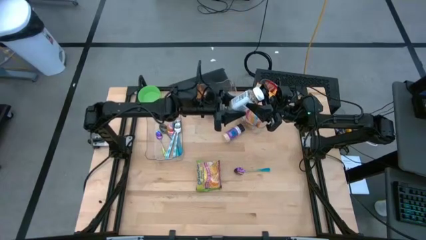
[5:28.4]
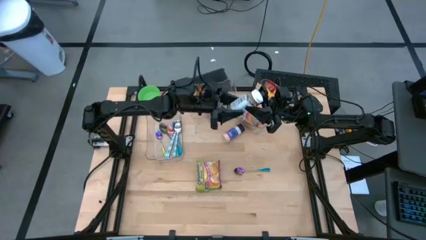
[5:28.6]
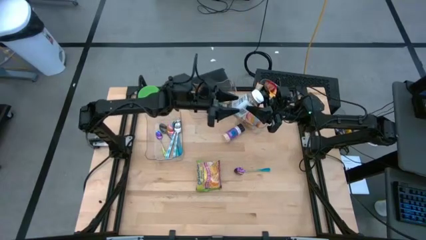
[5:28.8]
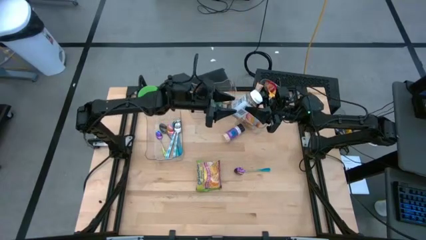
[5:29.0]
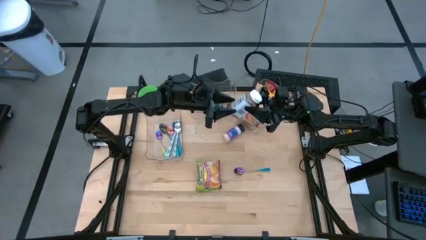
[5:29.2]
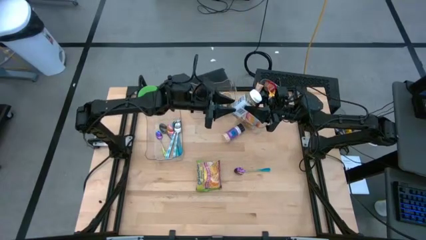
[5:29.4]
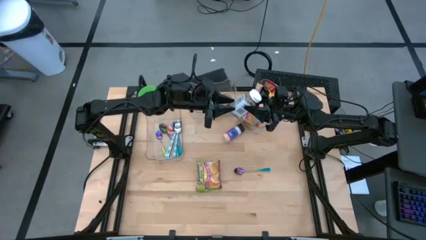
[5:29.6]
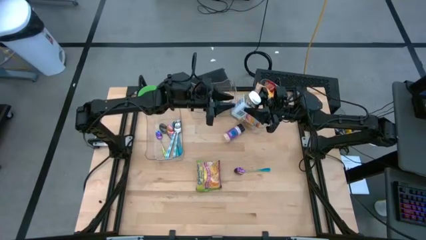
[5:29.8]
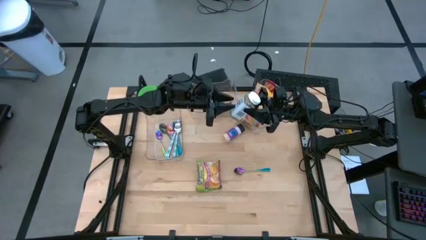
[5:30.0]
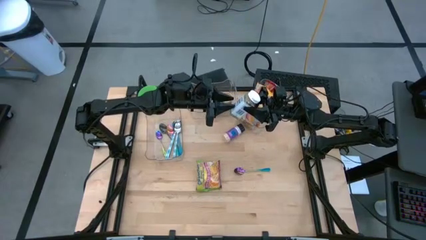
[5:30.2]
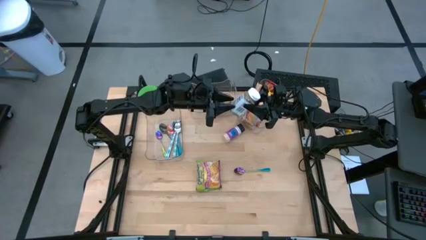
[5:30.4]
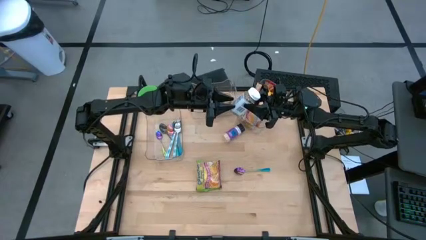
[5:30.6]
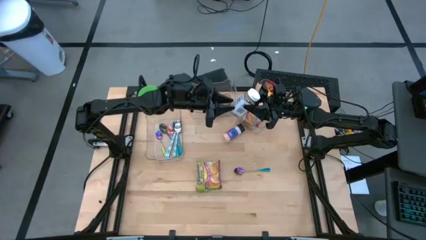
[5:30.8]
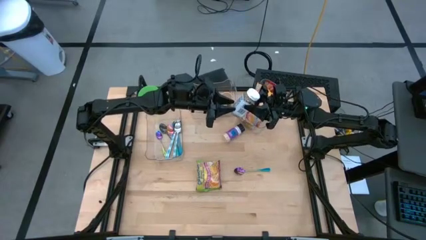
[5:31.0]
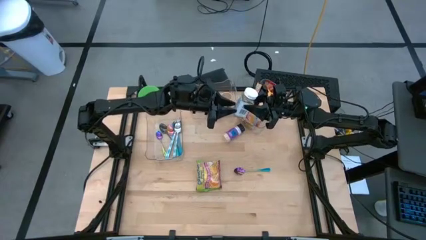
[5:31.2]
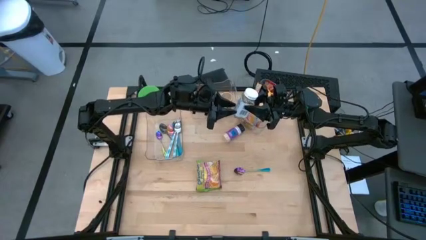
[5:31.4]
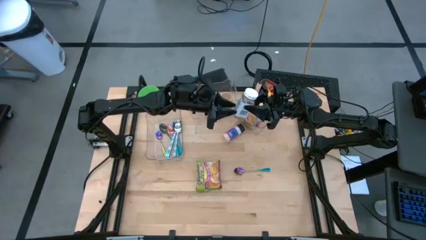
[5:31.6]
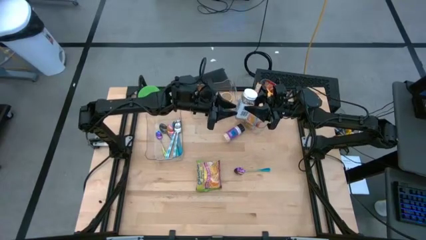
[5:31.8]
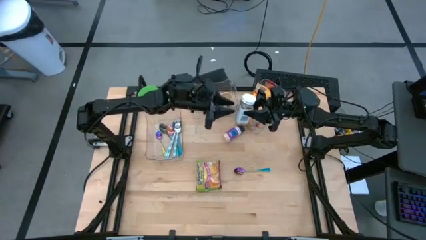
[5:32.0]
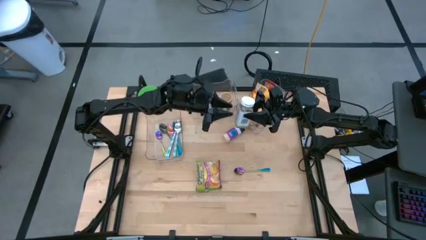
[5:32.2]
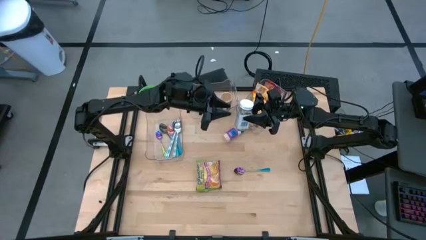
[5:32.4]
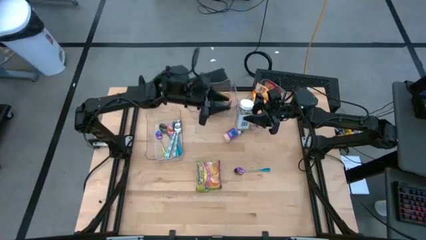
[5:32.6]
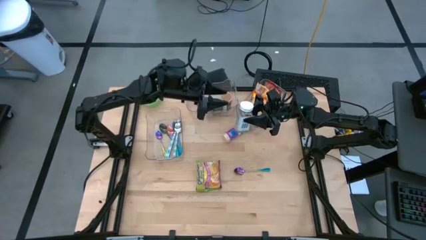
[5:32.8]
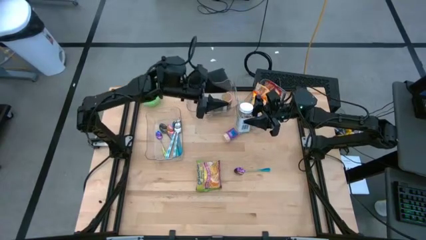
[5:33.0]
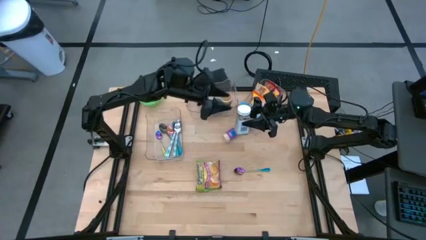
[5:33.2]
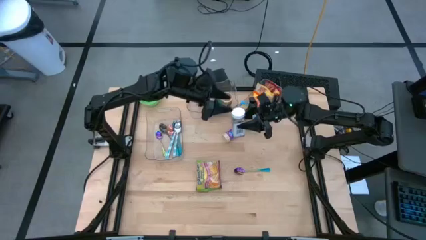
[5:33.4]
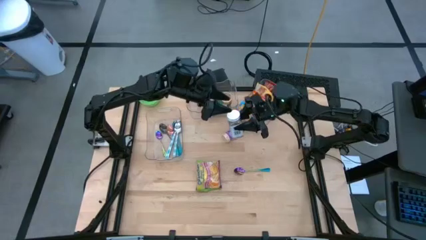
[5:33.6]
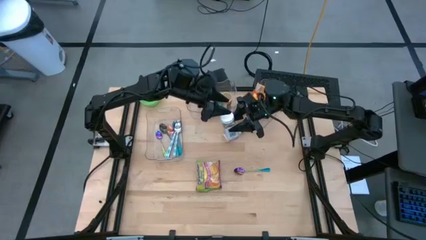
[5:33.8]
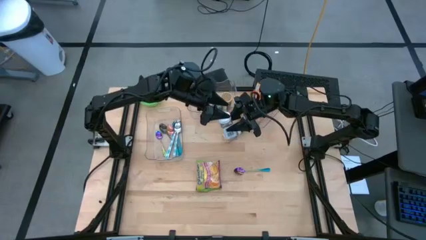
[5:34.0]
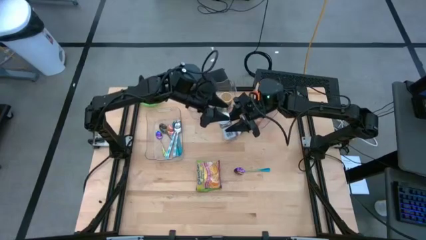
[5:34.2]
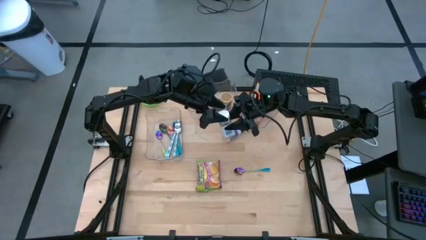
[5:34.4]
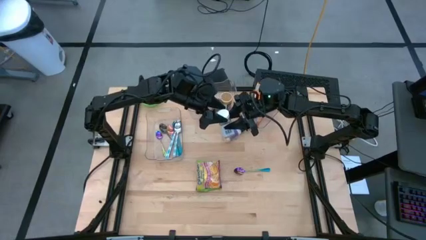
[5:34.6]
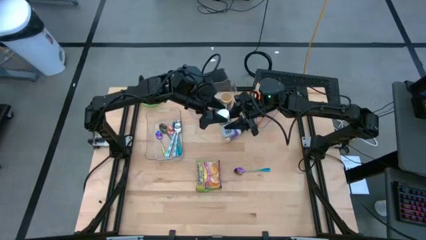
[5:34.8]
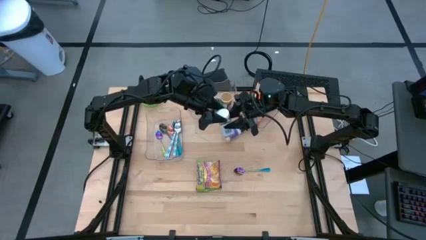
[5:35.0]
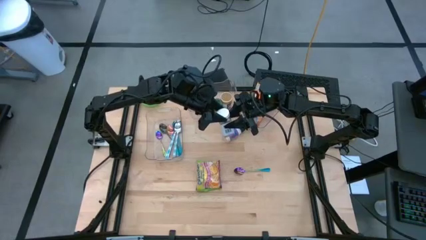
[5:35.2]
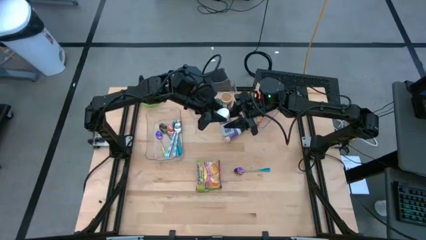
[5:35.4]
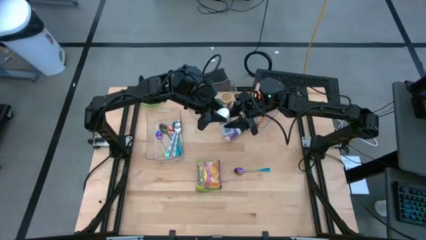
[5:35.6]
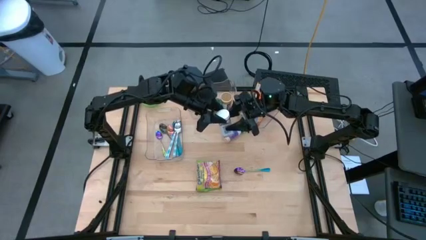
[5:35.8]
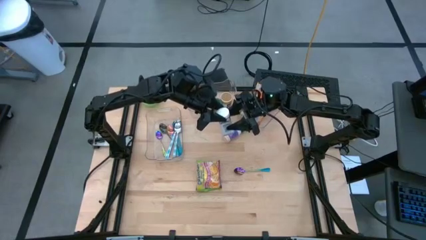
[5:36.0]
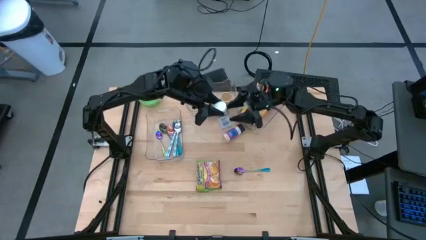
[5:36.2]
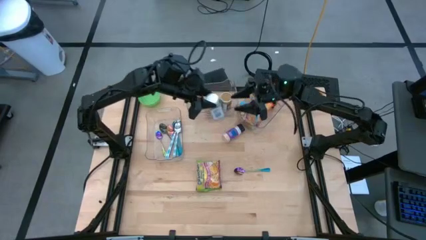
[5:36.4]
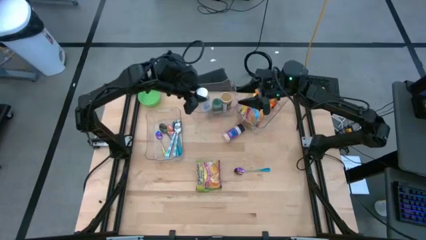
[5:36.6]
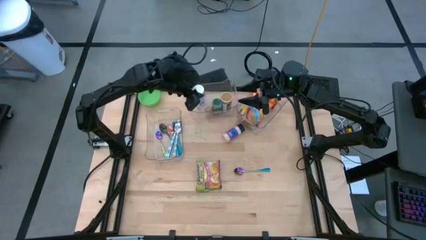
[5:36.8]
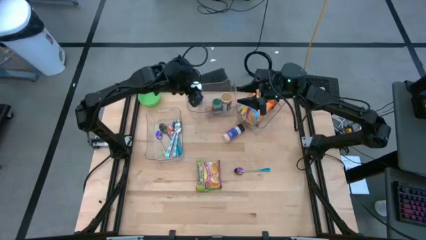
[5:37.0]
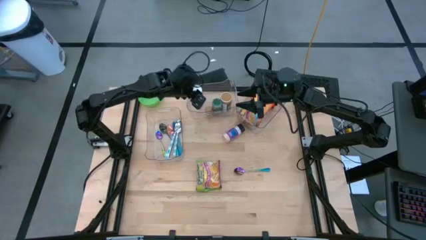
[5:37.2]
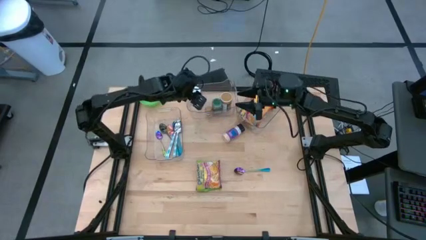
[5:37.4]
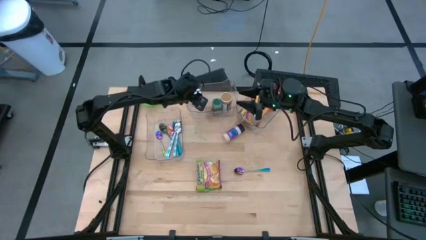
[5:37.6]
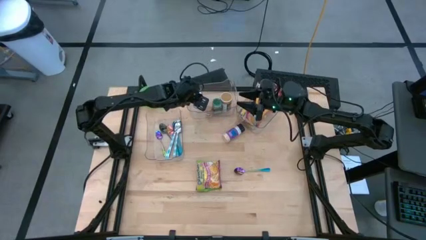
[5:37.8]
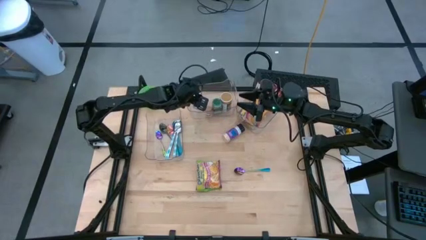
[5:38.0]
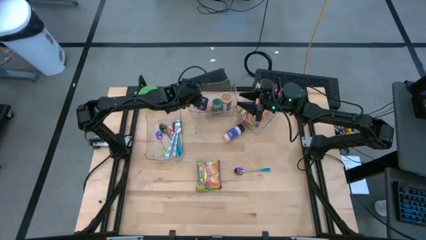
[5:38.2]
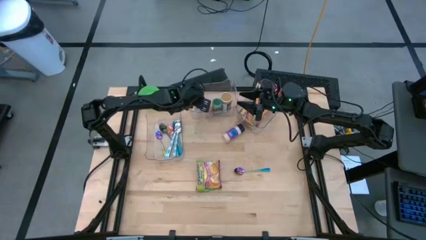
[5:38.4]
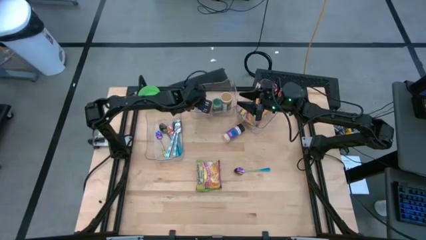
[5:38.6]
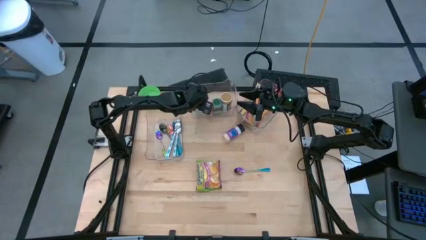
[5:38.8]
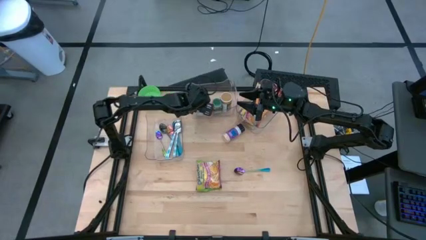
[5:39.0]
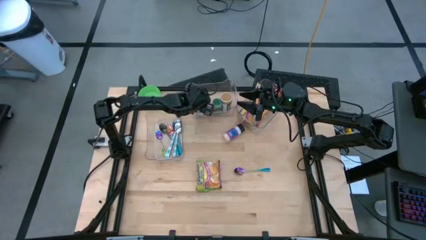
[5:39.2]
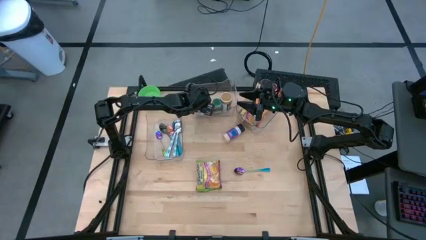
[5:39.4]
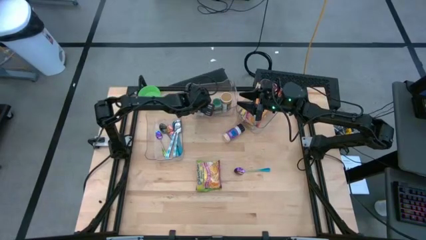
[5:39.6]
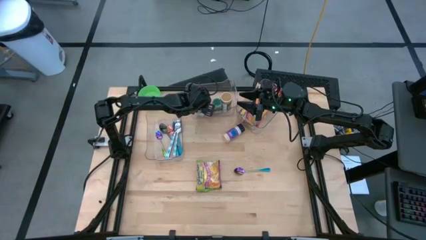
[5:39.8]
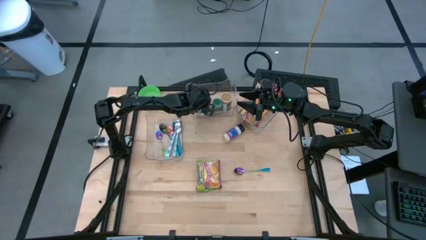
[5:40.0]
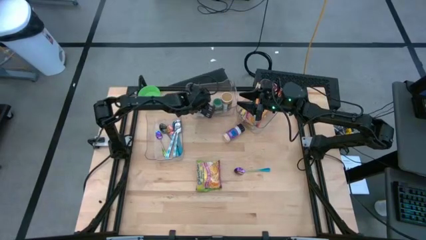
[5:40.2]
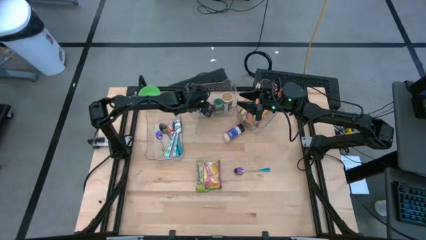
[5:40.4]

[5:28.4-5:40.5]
Task: Pick & Place Food Item
Put the white spice bottle into the middle transparent bin

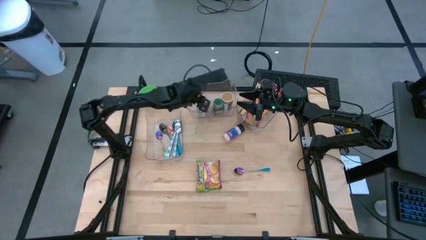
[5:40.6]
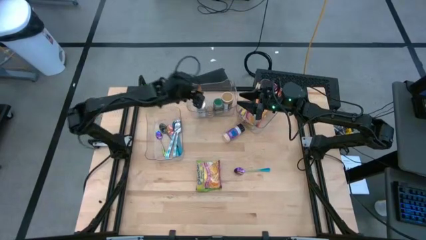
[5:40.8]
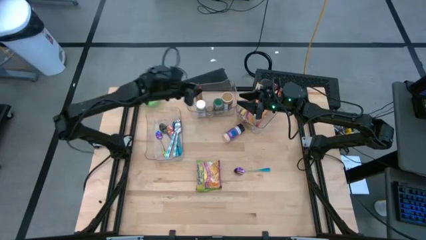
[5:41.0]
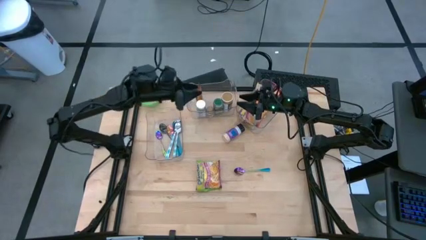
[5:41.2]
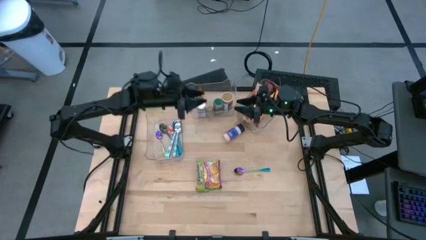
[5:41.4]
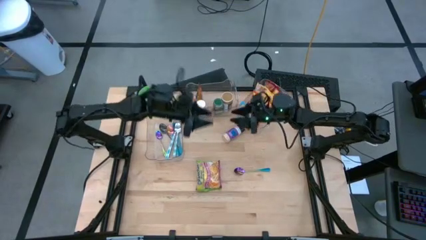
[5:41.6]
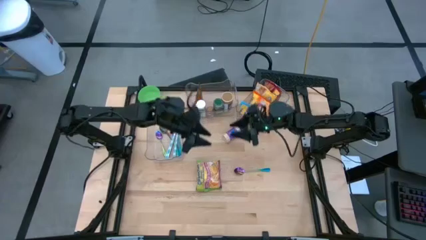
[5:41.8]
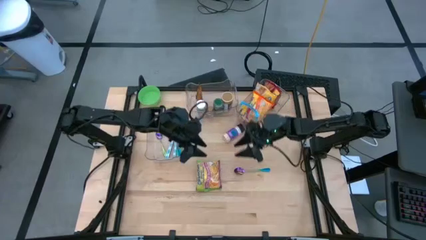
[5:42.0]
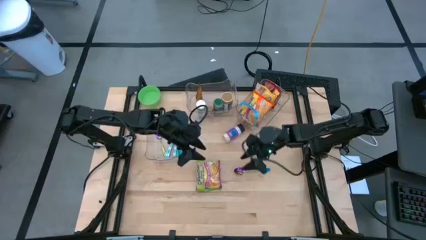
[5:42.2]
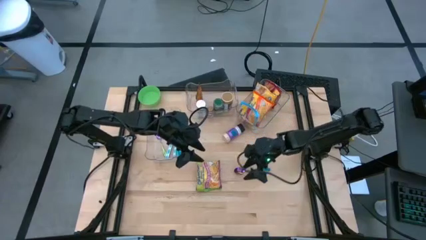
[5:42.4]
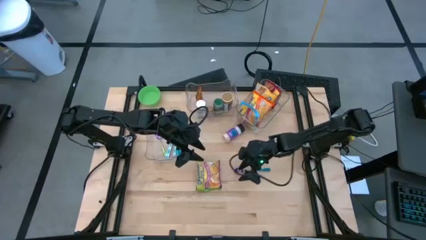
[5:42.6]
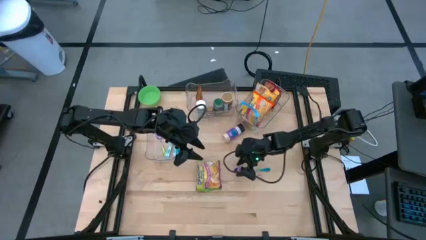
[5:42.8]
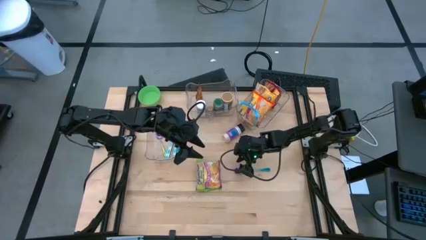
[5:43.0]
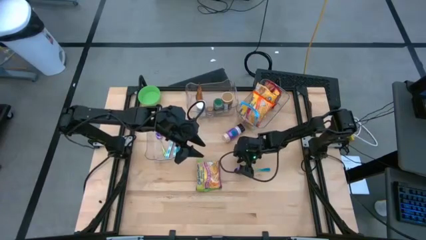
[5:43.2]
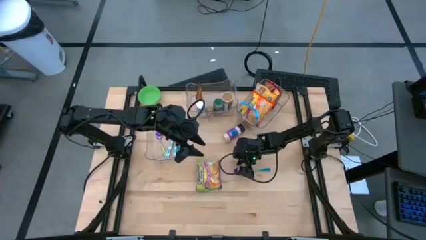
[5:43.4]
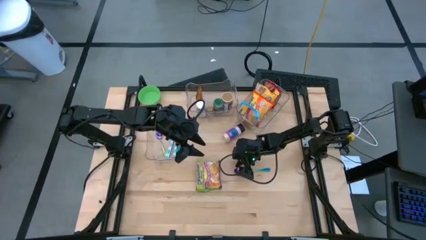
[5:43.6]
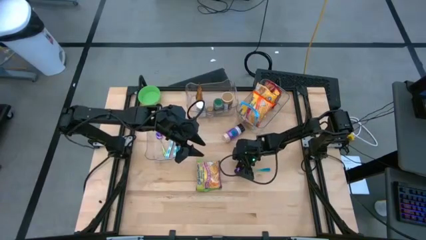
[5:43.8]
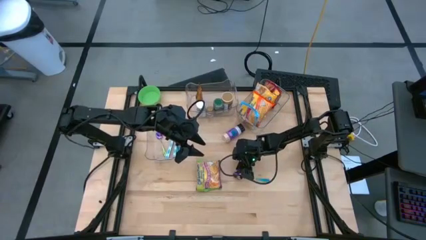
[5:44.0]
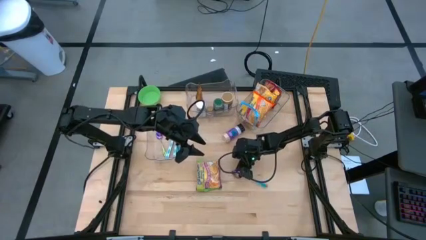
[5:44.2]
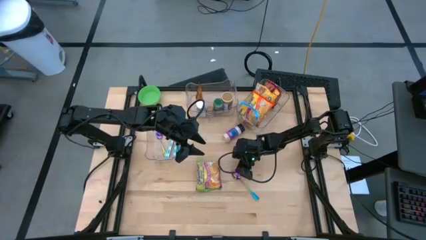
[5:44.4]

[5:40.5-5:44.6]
Put the violet spoon into the left transparent bin
